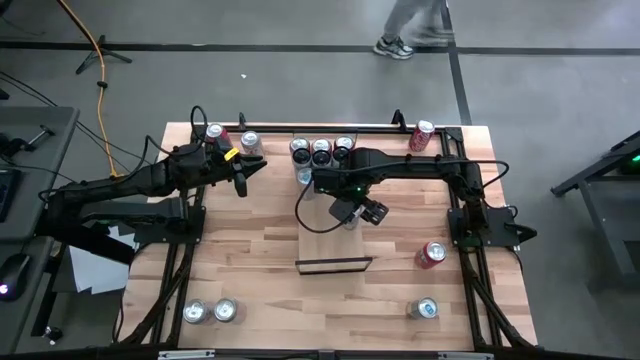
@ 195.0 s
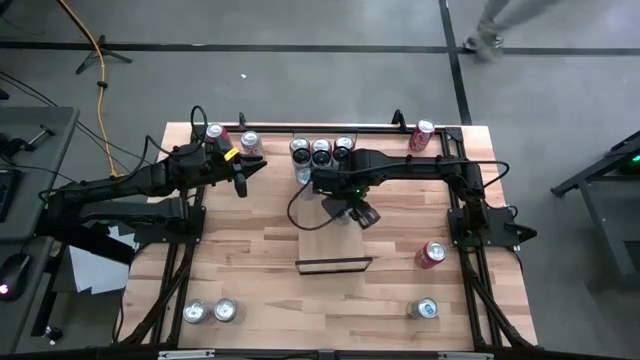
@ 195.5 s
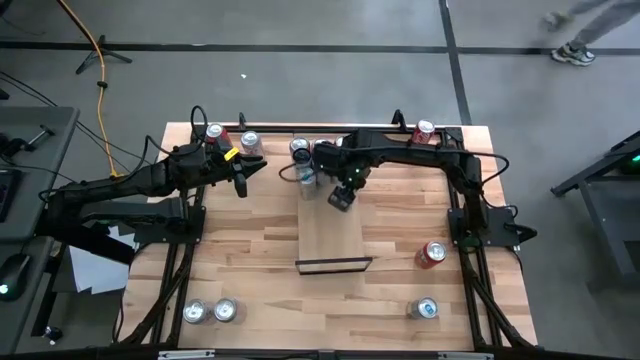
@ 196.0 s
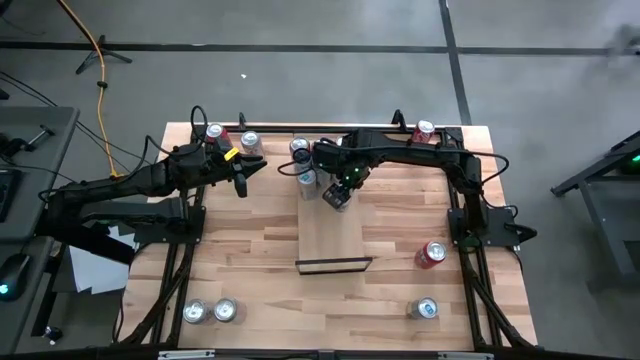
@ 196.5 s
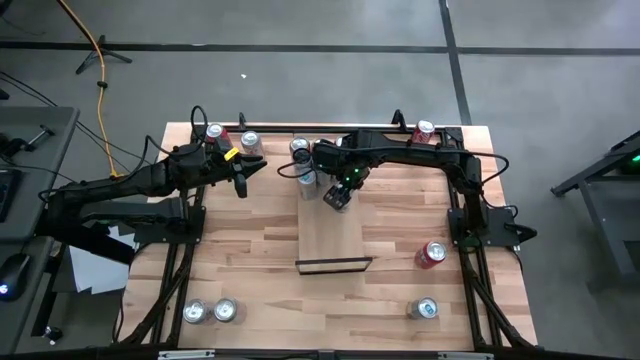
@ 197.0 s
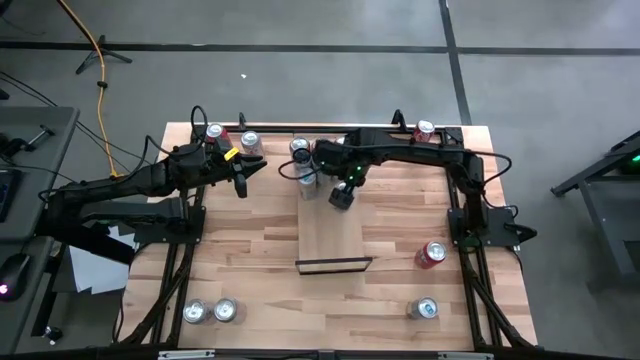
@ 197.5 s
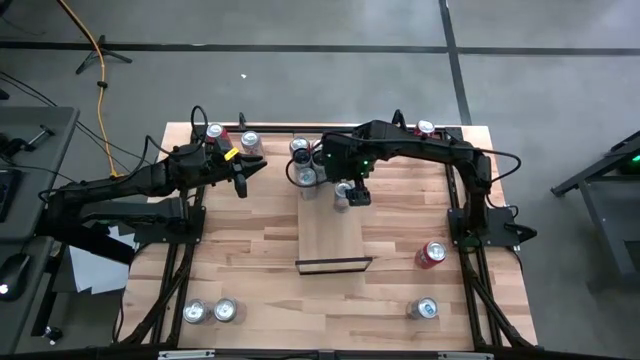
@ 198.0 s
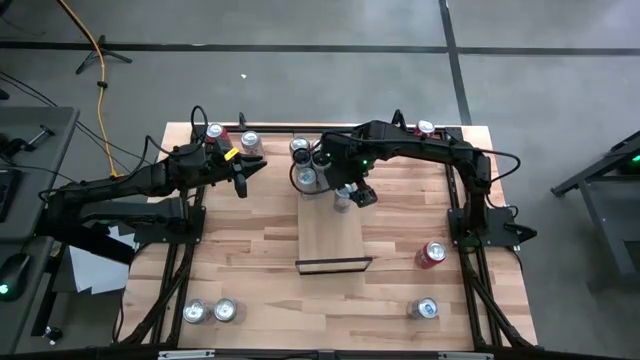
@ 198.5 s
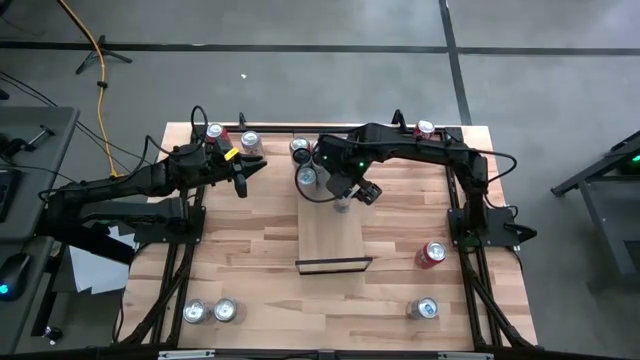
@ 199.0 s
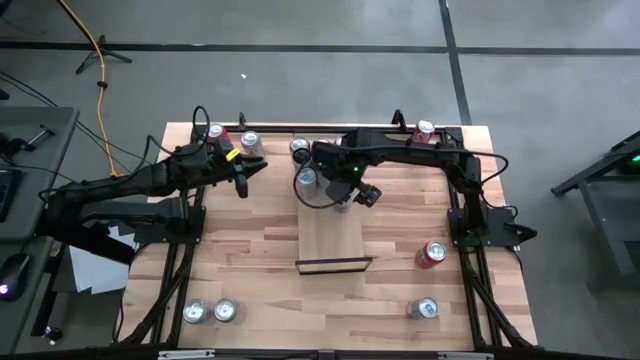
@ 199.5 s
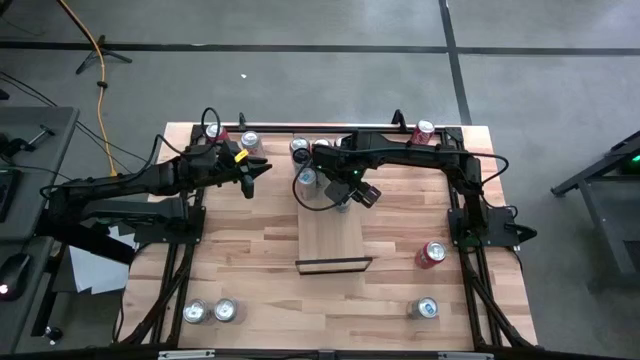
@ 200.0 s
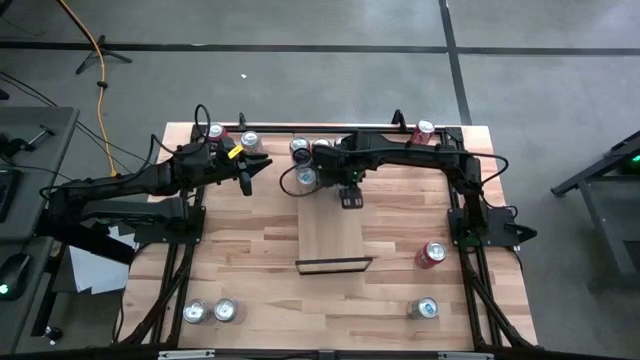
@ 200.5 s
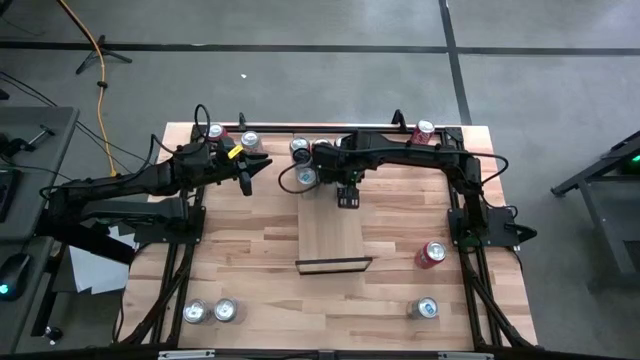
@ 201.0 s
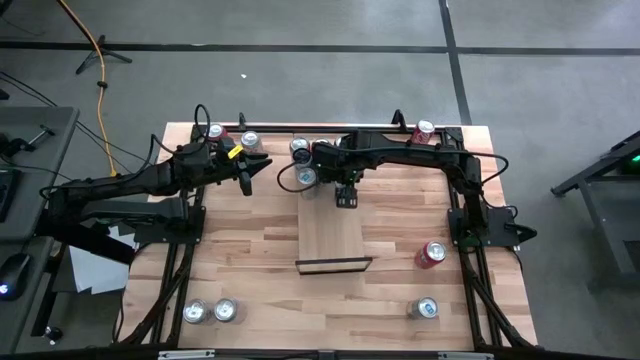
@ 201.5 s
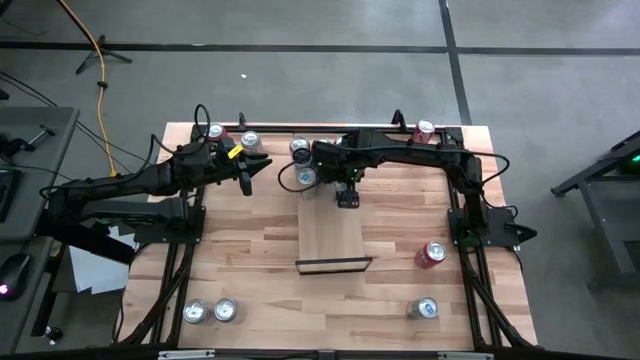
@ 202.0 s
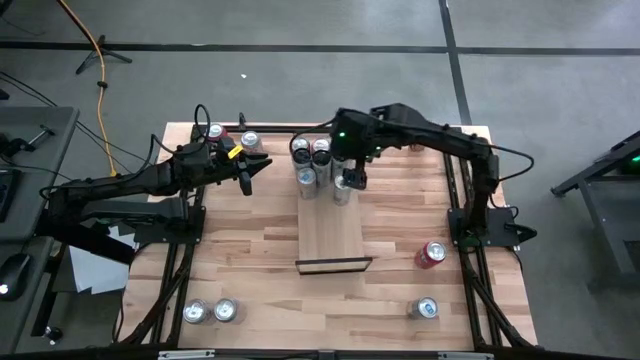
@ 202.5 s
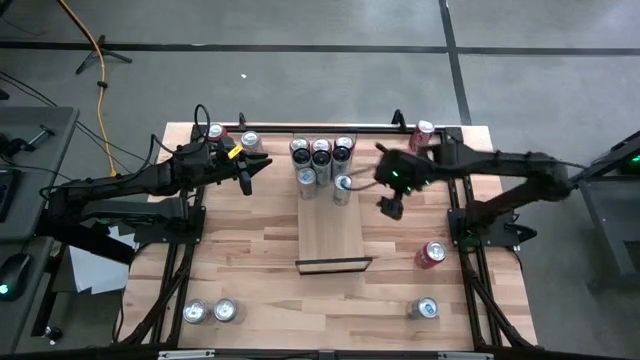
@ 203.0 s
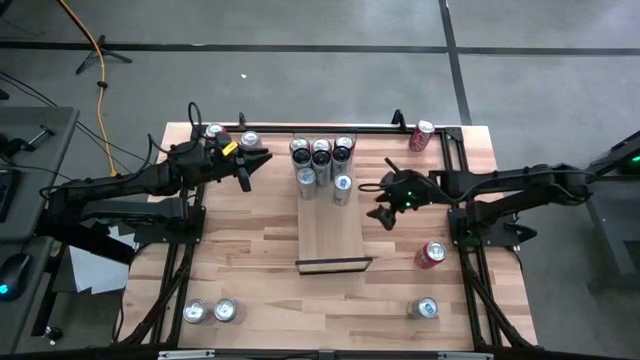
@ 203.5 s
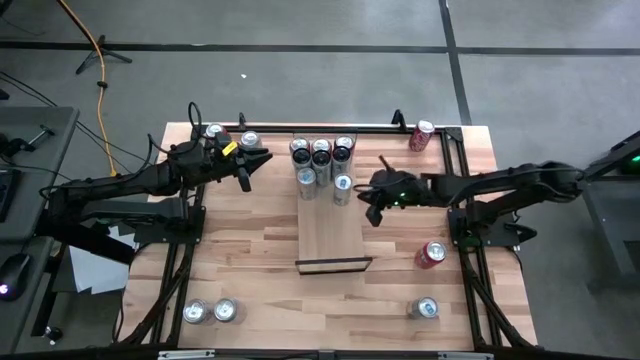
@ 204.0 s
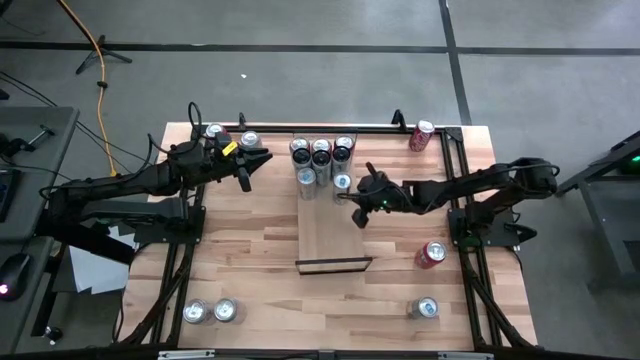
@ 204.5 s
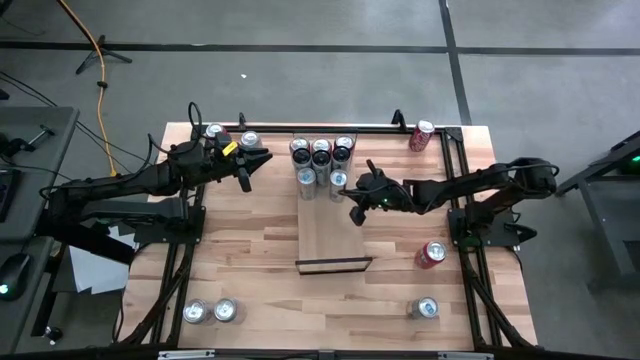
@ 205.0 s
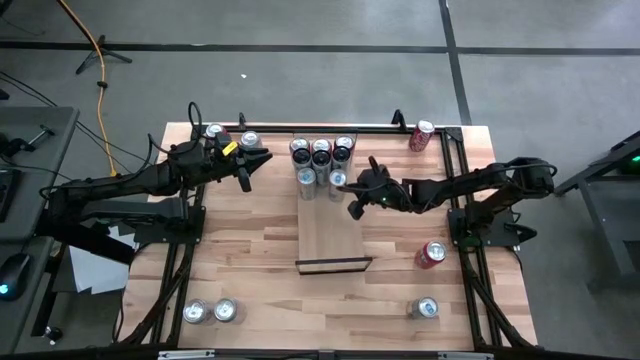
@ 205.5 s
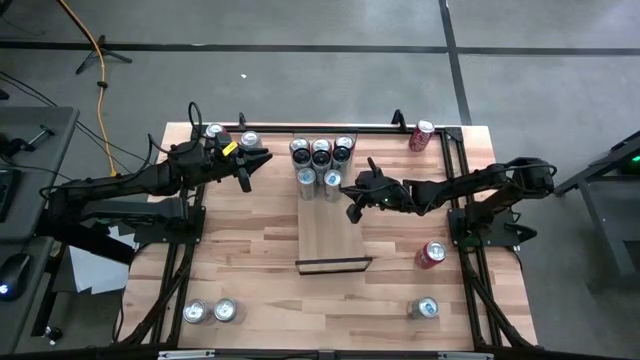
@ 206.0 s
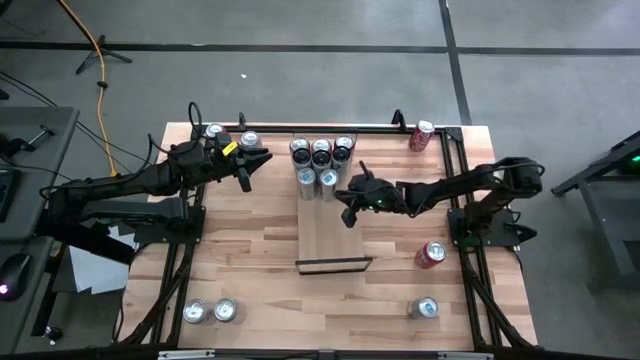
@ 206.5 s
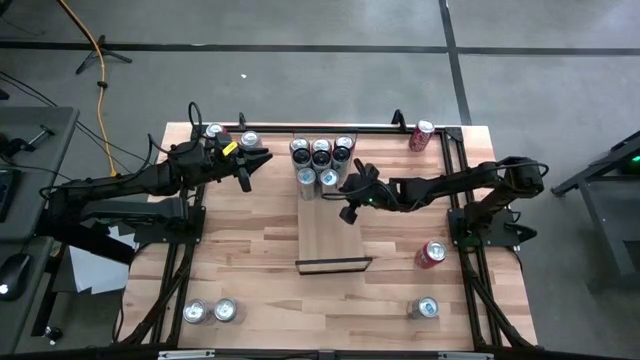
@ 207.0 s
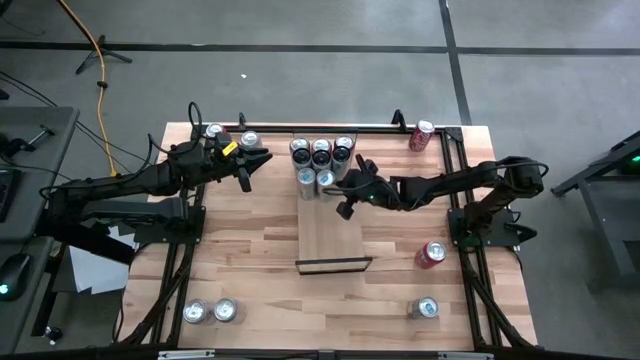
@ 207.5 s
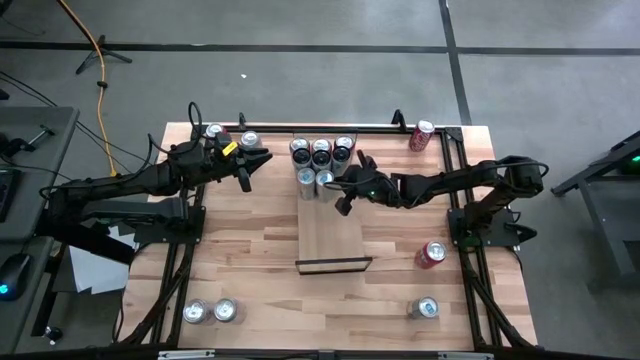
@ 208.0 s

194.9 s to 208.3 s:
Task: Place canned beverage on shelf
Put the blue soda can on the shelf aligned with the other blue soda can

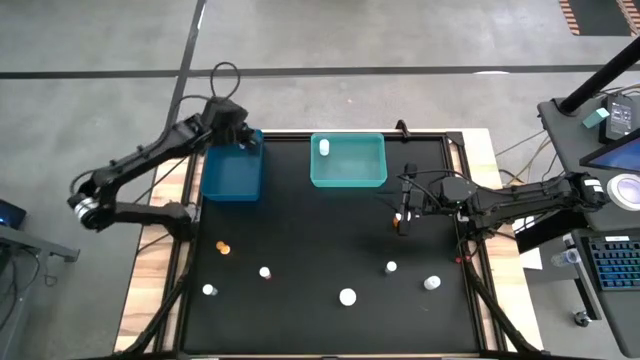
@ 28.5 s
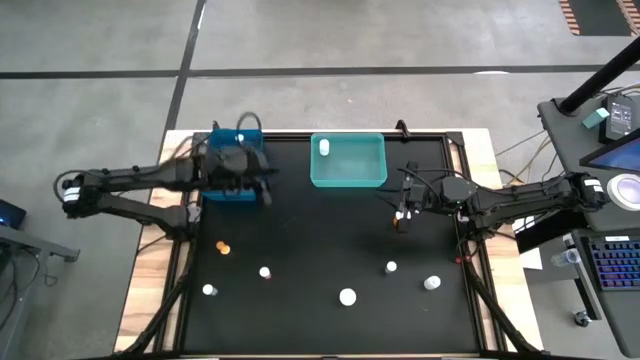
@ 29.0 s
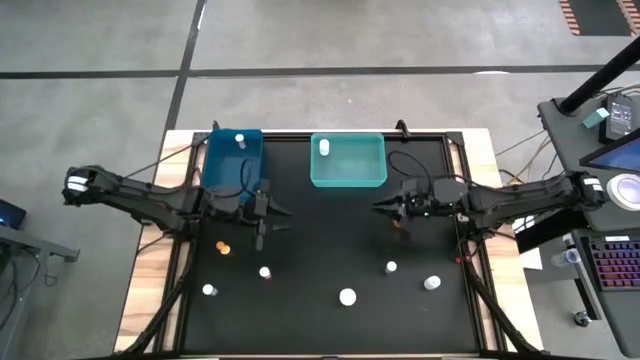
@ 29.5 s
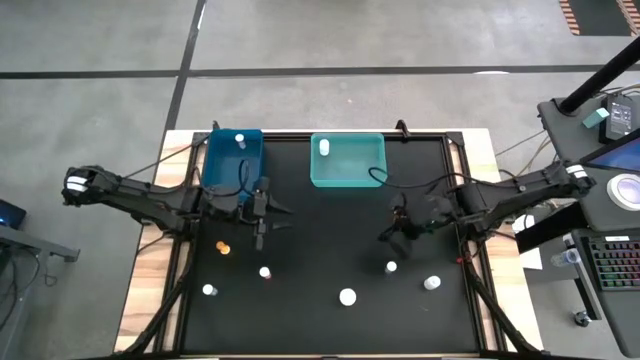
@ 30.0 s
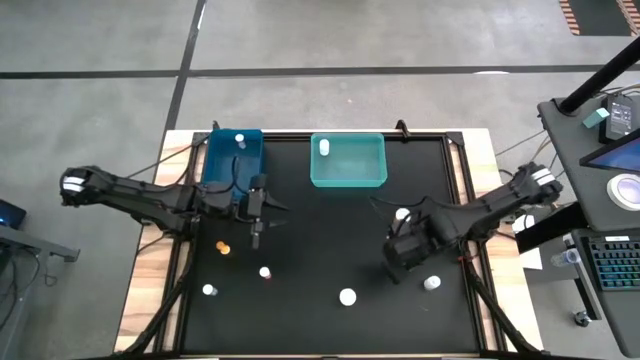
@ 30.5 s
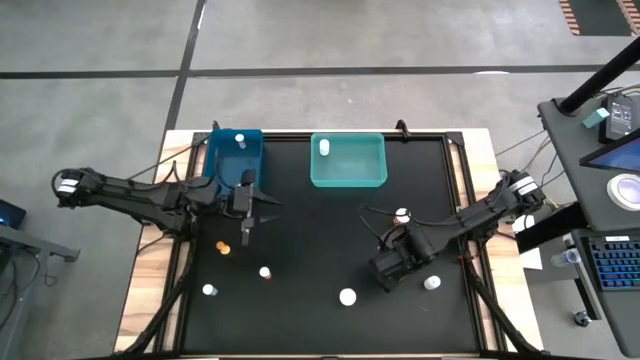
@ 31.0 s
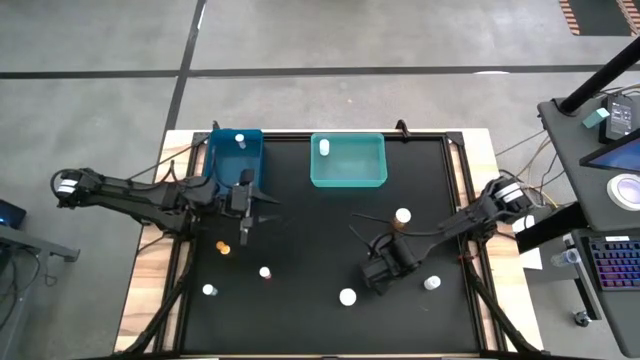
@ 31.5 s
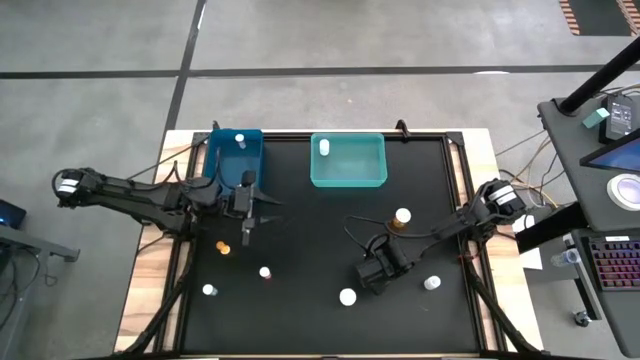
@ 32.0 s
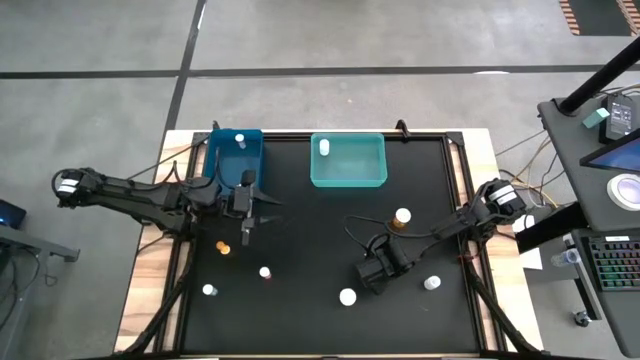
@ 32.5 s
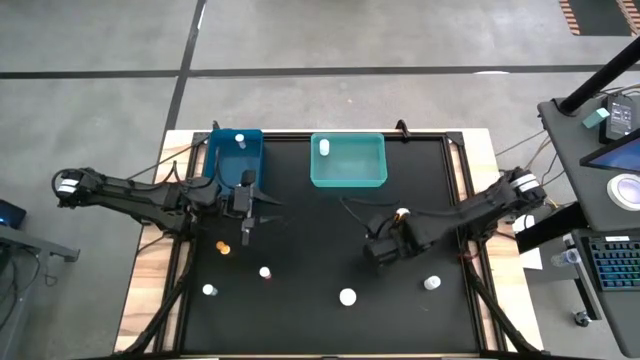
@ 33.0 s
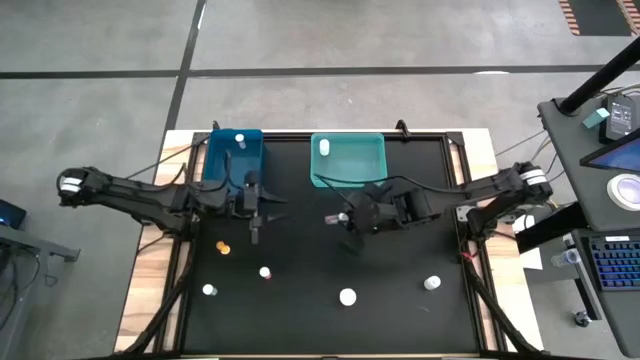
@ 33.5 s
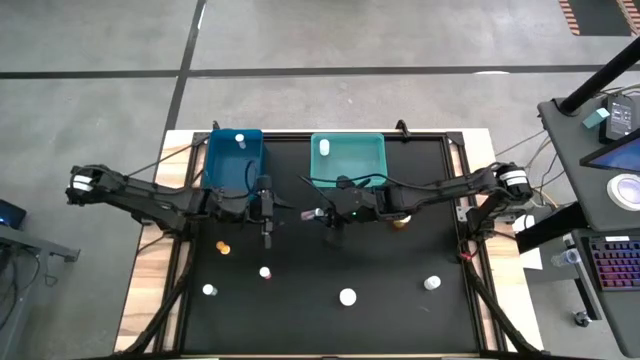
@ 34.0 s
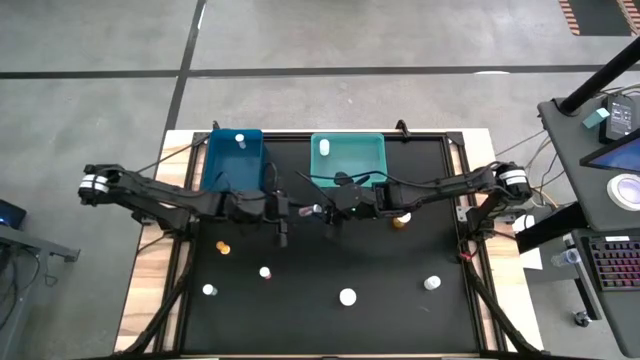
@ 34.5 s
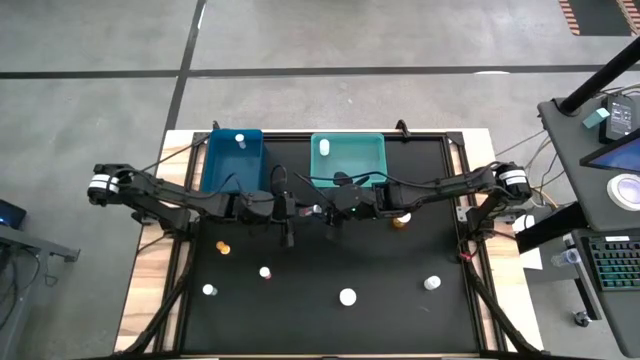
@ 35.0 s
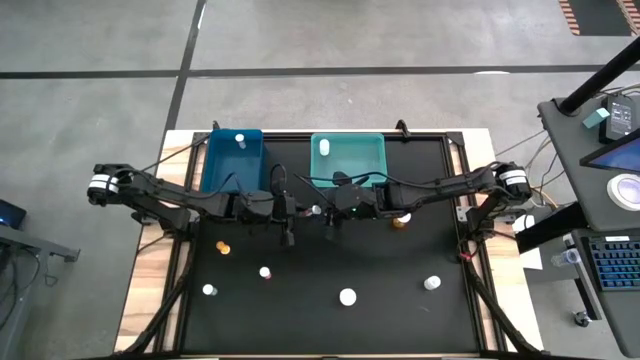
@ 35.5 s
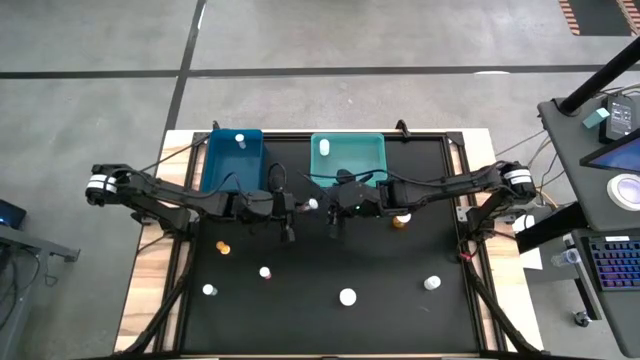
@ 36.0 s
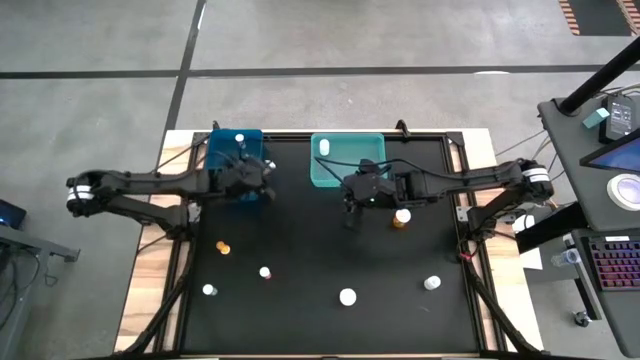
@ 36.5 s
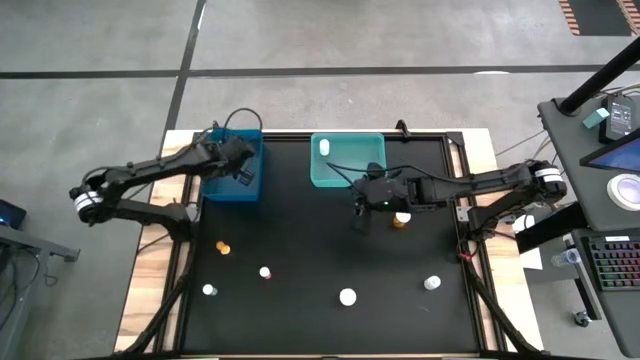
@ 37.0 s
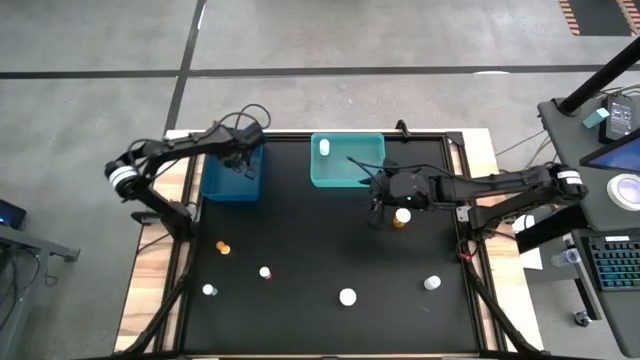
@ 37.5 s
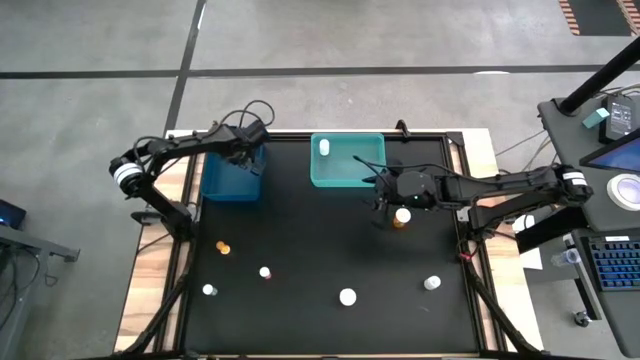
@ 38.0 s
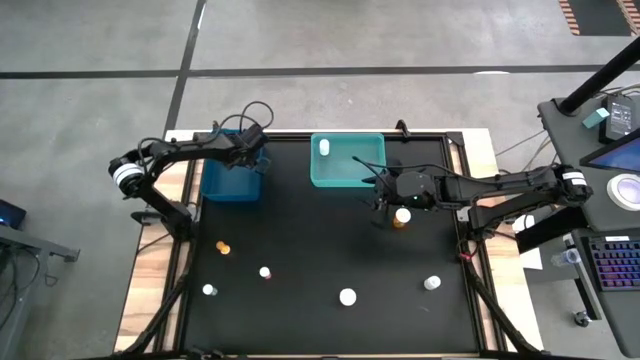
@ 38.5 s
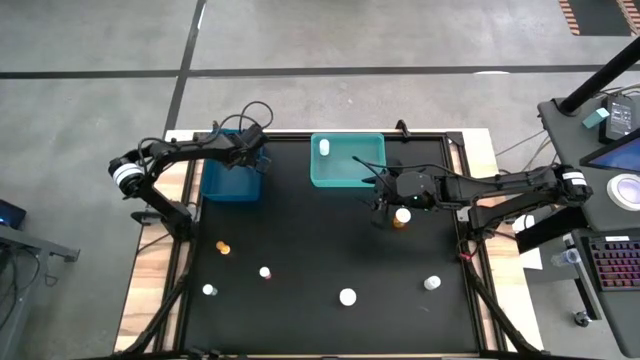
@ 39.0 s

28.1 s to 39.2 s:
Task: Pick and place medicine bottles into bin by pill shape (circle, oval)
Put the blue capsule bottle into the blue bin
